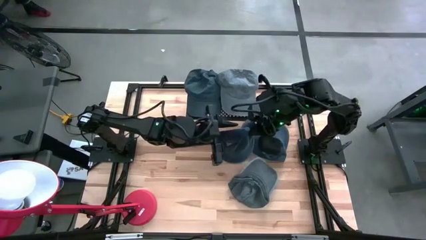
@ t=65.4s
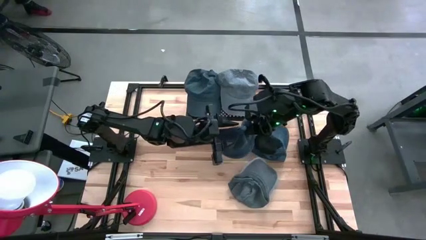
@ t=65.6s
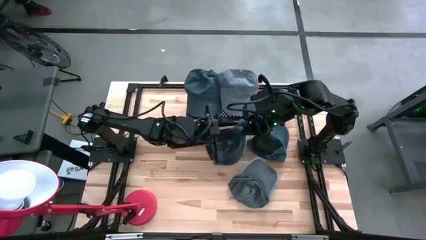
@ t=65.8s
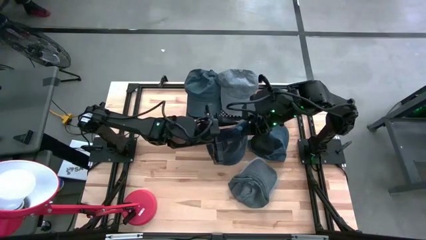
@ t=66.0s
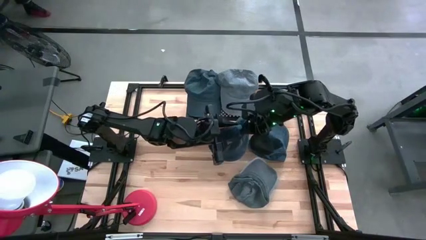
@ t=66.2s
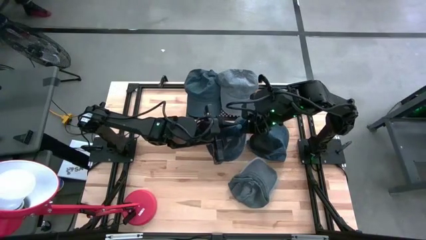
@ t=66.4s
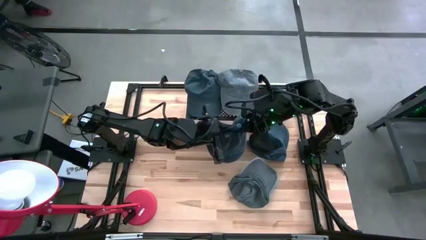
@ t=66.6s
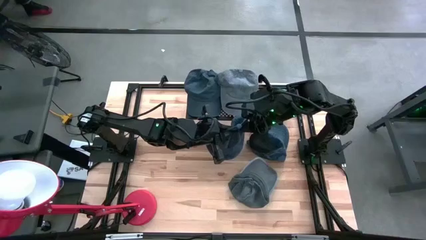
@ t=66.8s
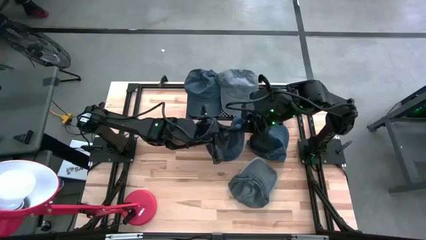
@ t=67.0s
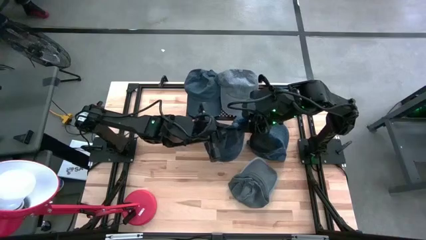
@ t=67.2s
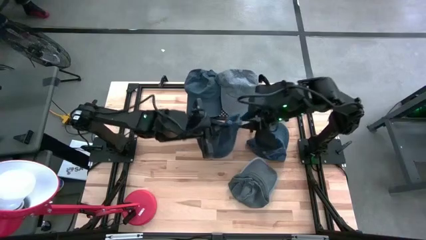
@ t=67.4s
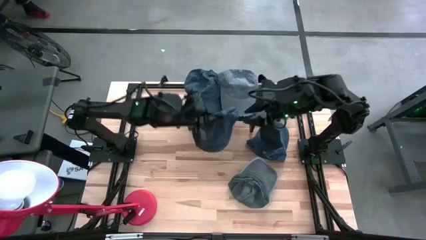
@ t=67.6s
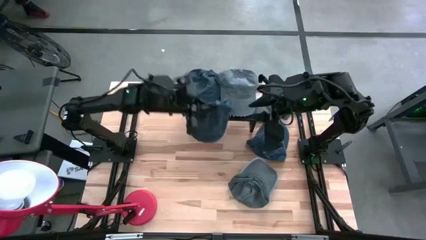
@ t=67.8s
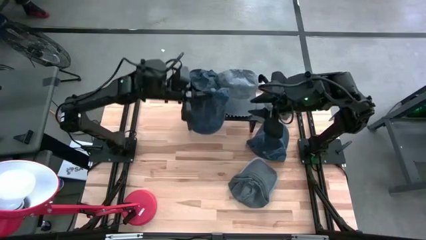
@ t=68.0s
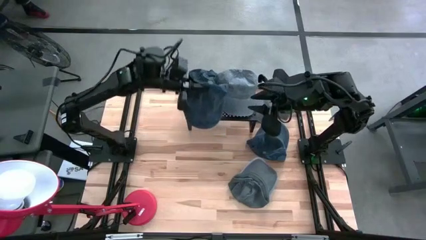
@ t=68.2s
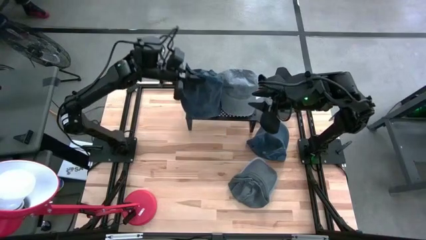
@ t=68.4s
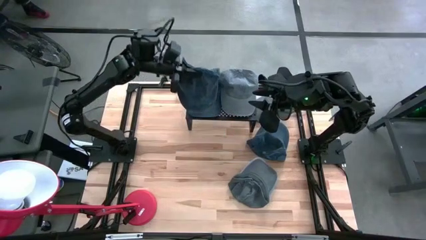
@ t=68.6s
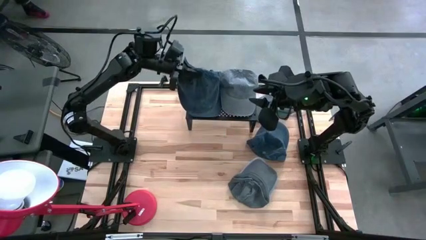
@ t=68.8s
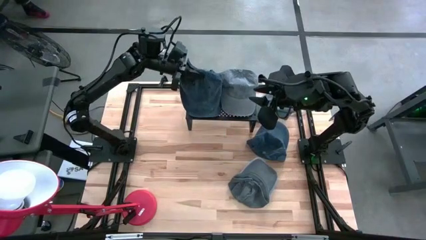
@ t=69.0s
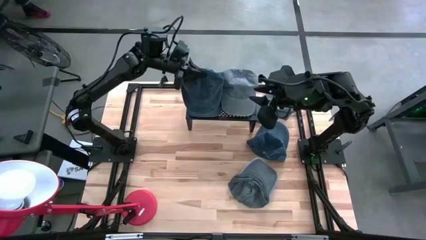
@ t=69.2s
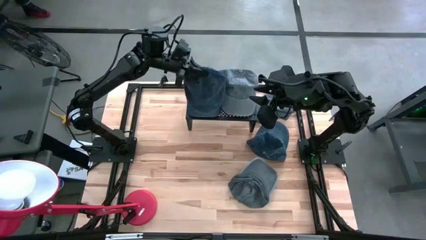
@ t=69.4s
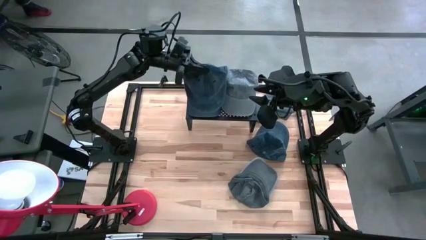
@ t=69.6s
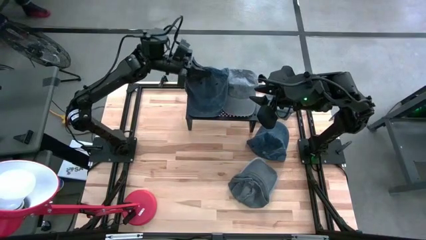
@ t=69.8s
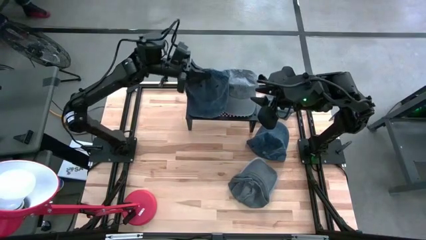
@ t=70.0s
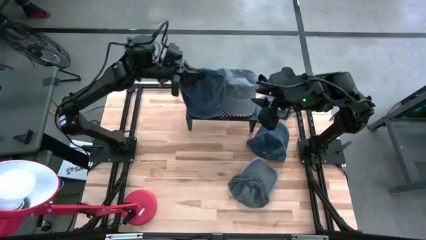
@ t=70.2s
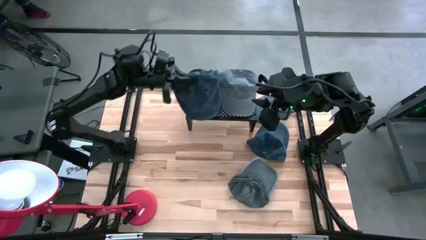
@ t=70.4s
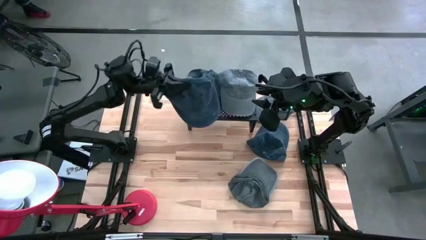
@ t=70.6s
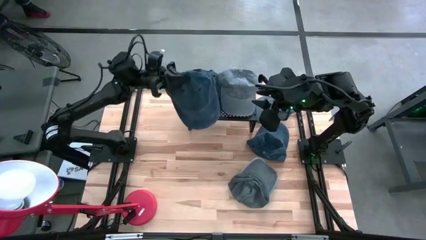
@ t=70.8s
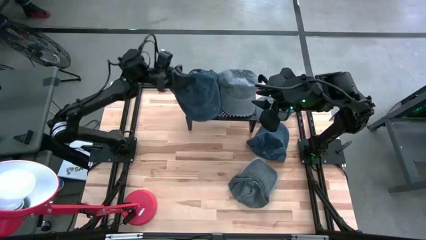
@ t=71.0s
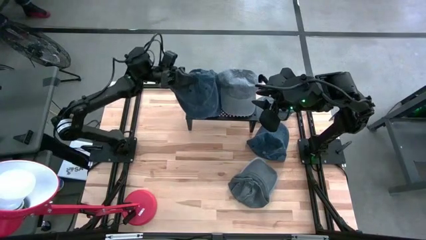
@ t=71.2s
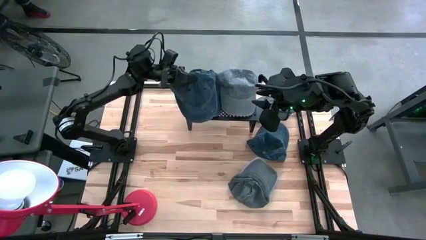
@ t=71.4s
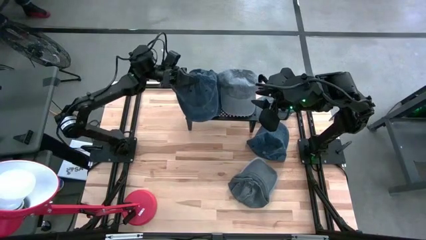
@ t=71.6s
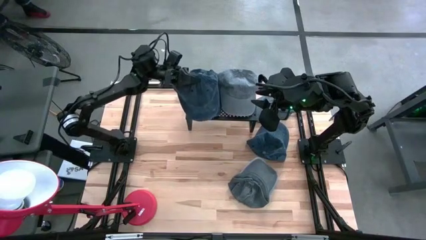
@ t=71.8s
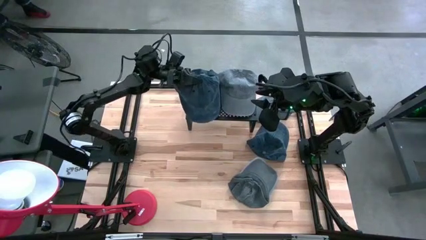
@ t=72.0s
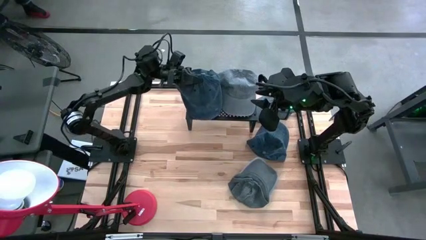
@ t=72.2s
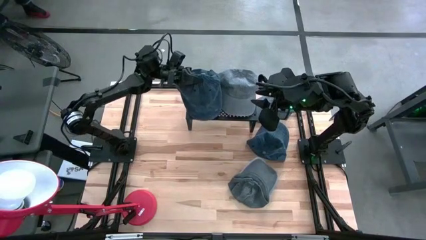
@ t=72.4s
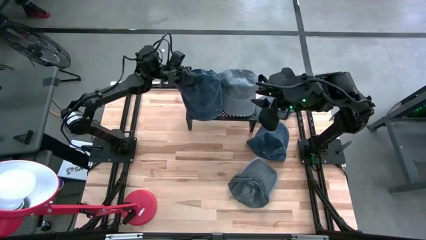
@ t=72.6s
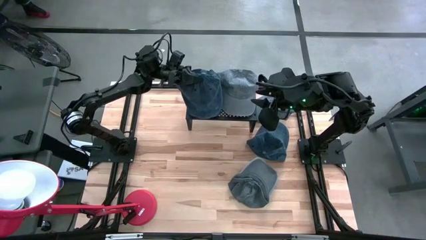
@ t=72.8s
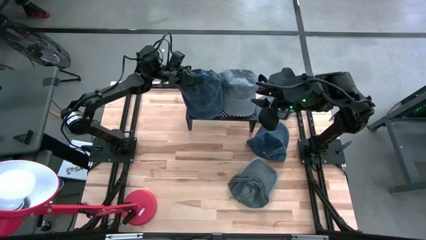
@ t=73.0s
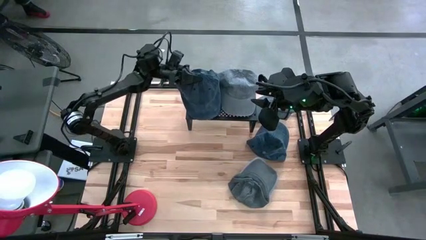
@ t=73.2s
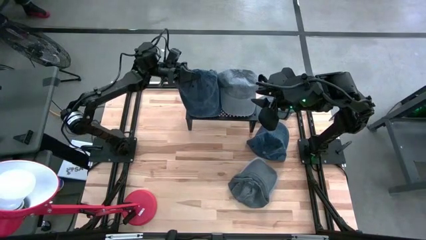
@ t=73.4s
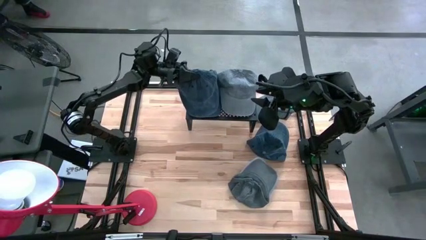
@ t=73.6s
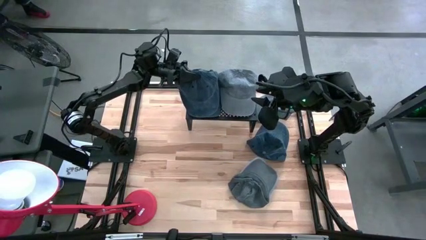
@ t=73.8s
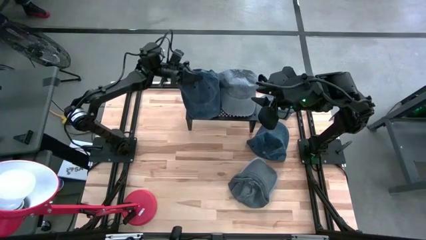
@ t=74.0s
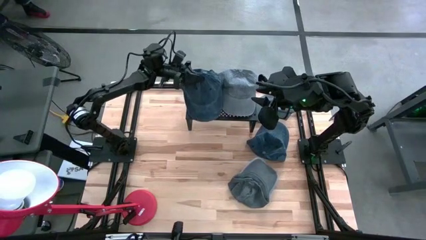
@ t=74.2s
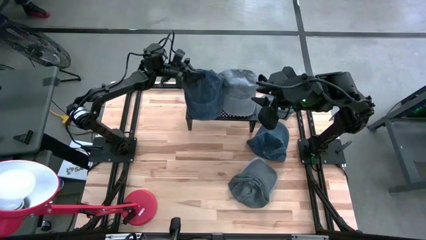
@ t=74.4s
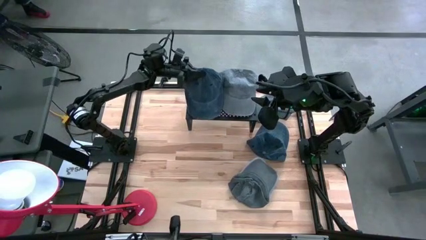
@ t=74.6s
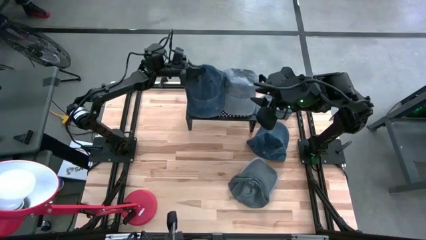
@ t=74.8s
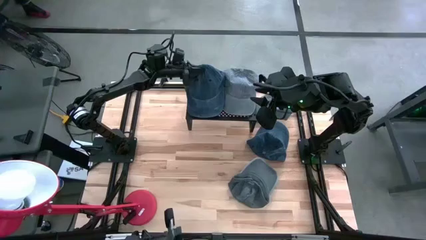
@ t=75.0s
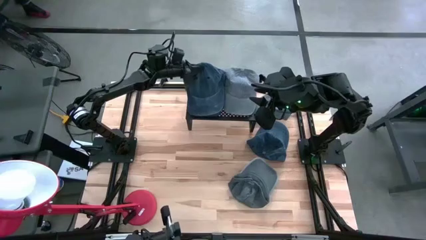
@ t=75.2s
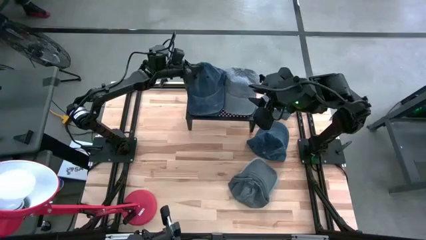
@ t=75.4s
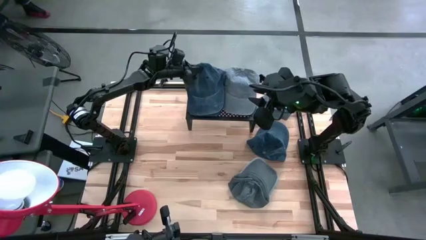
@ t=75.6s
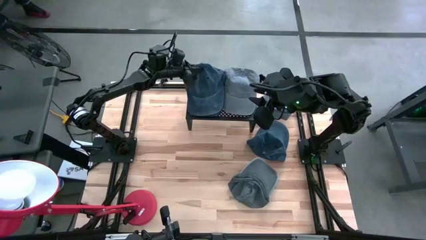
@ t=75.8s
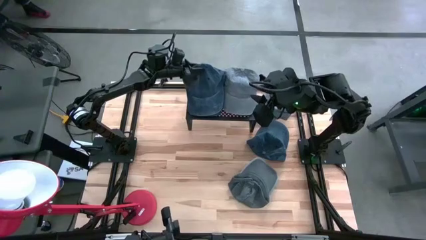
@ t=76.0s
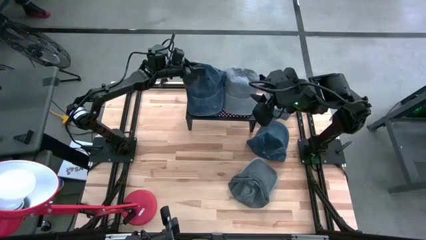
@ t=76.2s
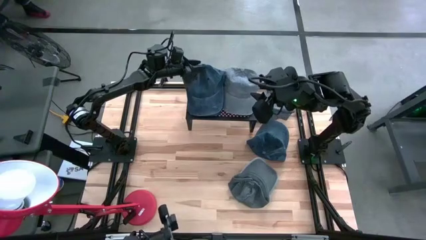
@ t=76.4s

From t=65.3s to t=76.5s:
Task: Pick & Place hat
Stack the left blue cap on top of the blue cap on the shelf

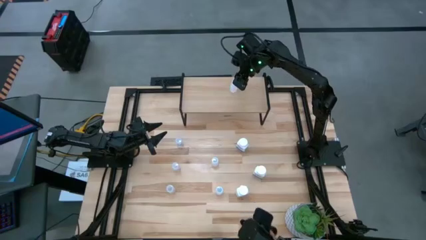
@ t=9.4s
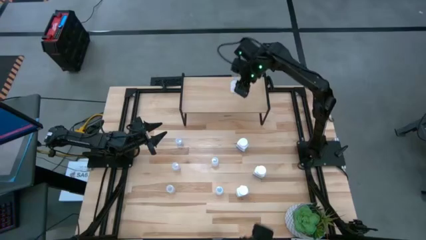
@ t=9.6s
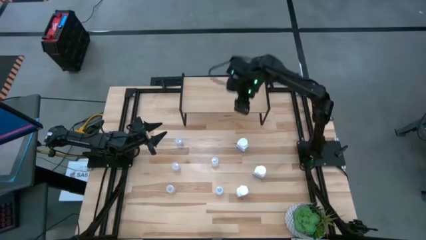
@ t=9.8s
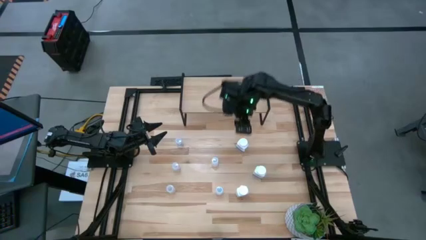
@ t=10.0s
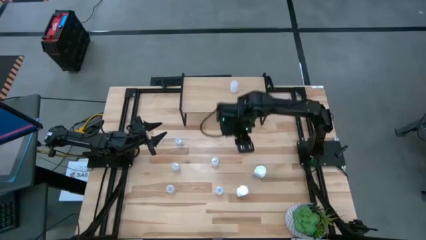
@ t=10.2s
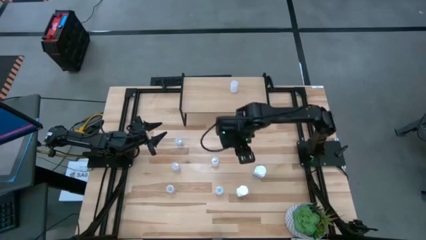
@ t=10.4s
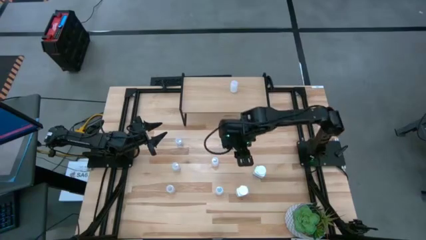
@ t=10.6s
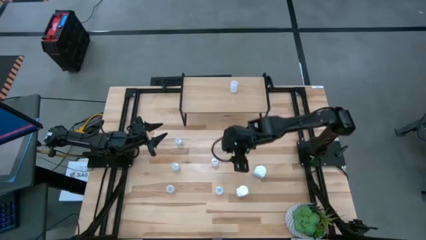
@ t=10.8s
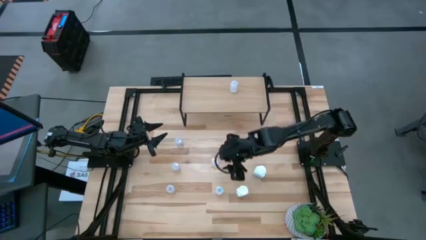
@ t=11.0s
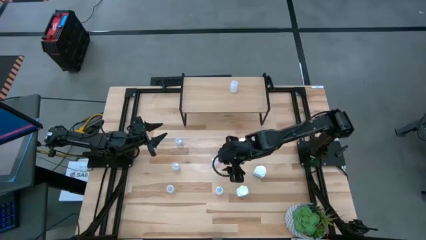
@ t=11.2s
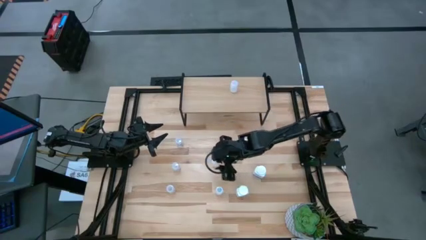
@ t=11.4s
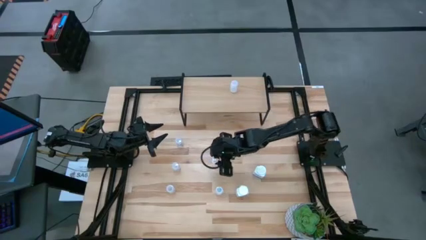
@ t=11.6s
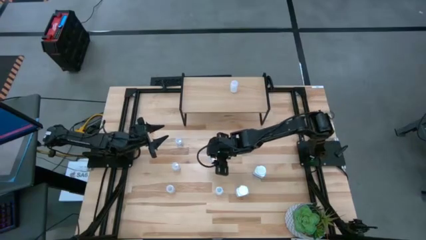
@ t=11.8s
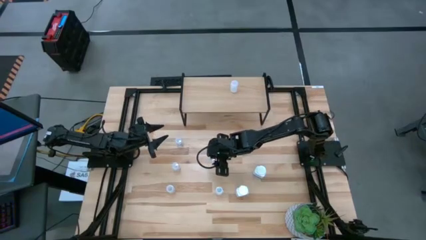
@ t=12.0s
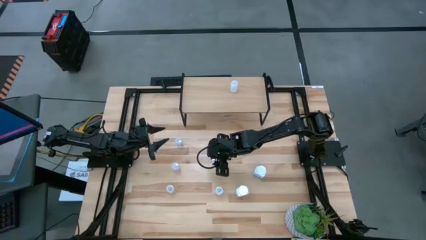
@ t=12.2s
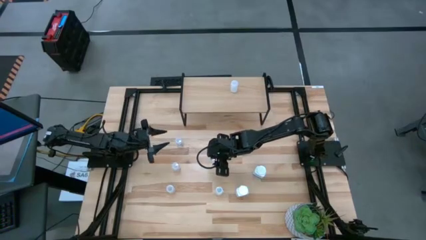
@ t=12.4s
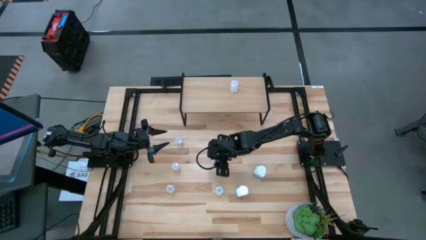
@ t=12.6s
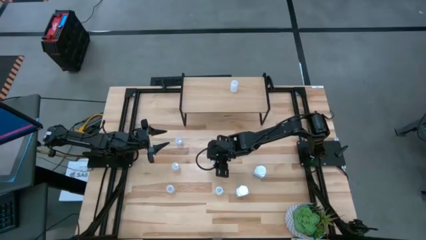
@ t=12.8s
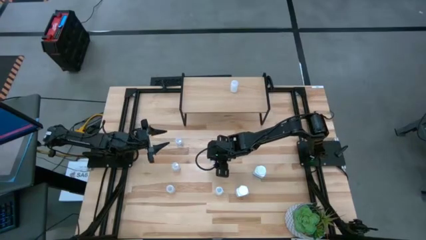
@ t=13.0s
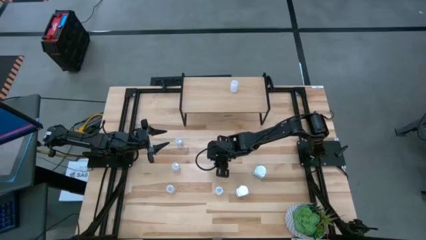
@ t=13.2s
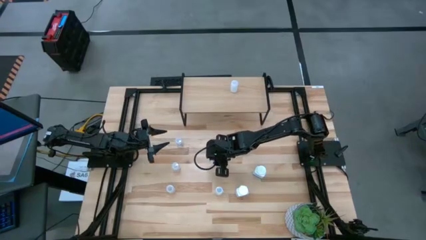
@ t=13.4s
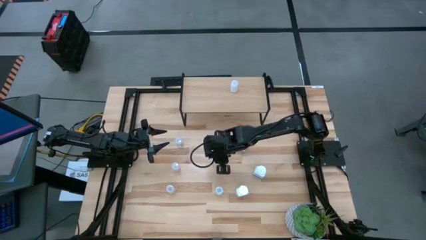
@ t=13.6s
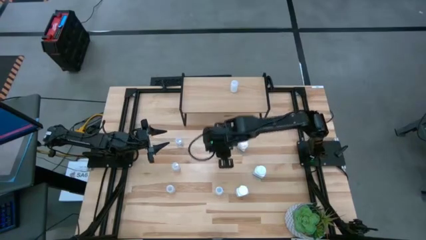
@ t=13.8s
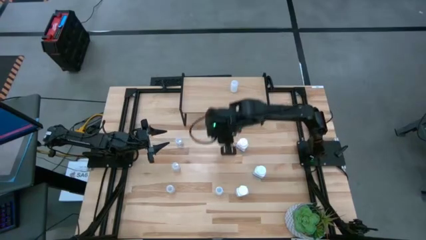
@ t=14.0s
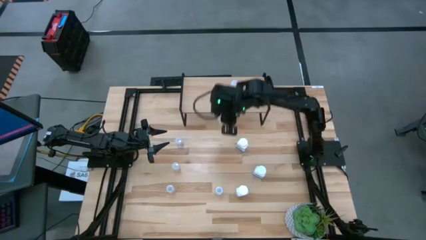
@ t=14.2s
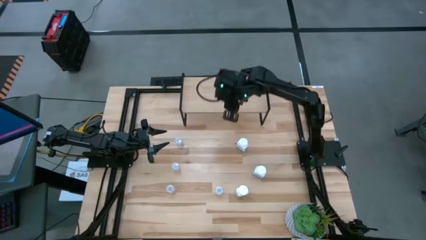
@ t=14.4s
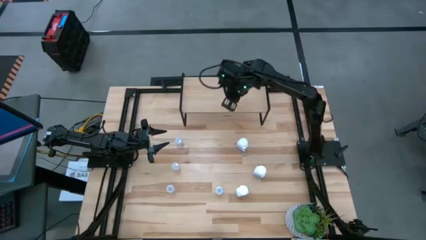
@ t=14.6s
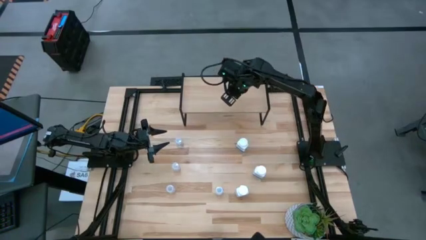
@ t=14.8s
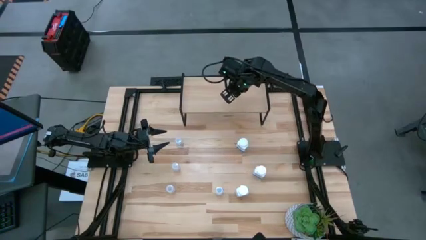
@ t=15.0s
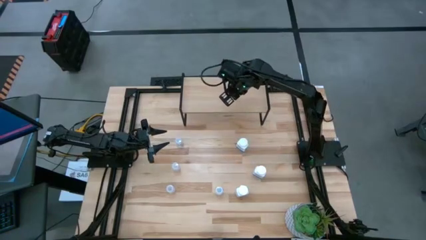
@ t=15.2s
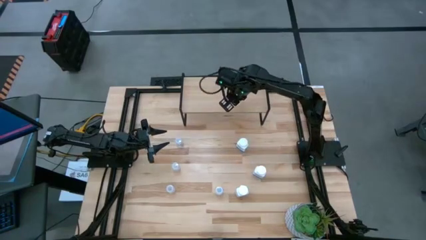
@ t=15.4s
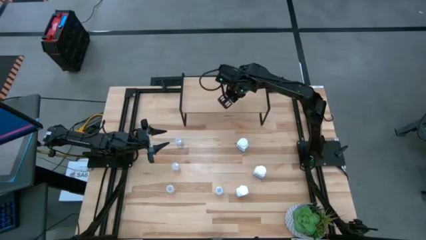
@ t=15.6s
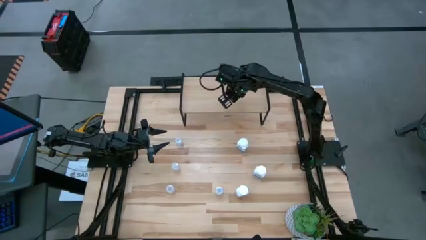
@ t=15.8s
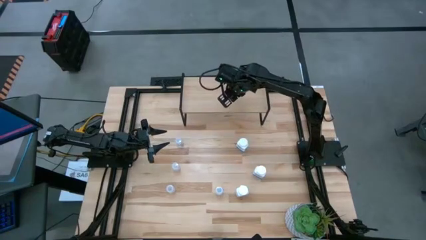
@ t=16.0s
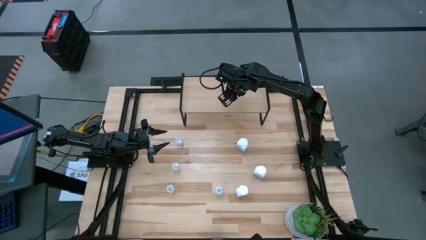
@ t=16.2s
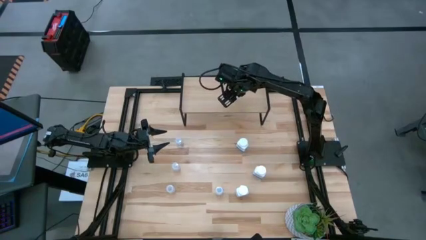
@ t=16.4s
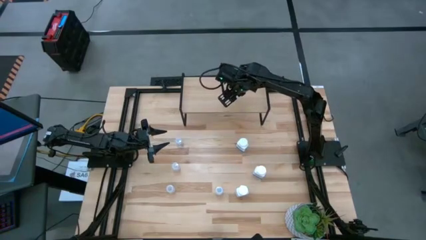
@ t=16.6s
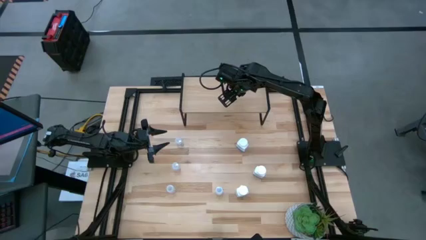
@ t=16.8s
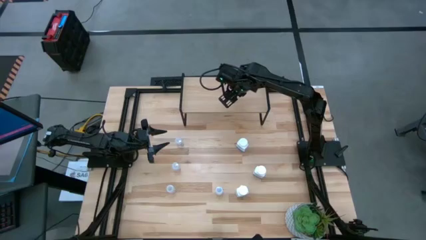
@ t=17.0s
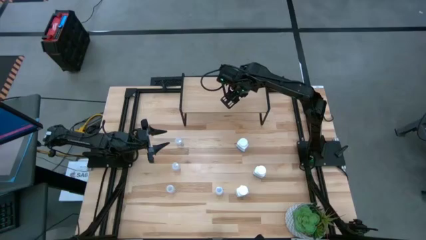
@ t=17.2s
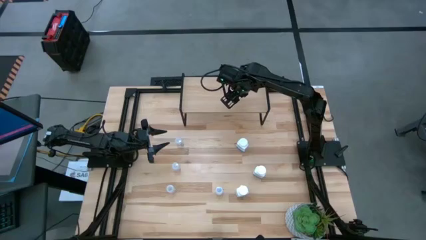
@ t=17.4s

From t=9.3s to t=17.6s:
Task: Pick and place medicine bottles onto shelf by color
Put the small white pill bottle on the shelf aligned with the other small white pill bottle
